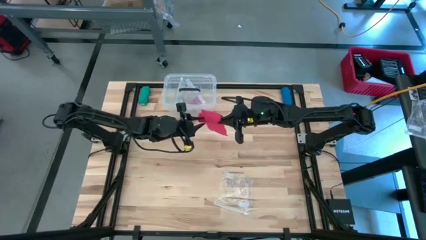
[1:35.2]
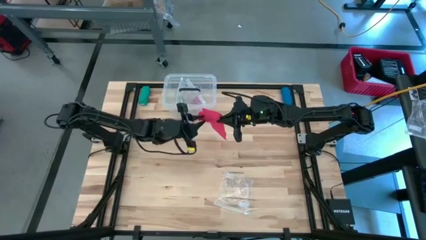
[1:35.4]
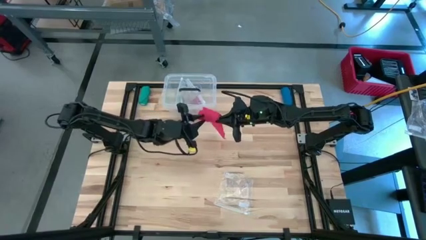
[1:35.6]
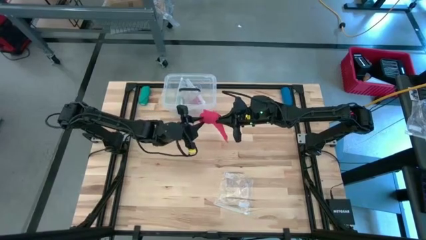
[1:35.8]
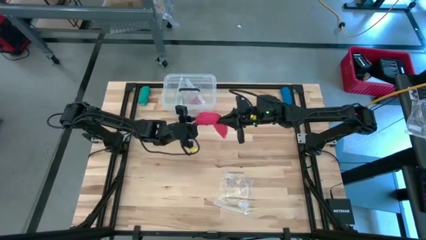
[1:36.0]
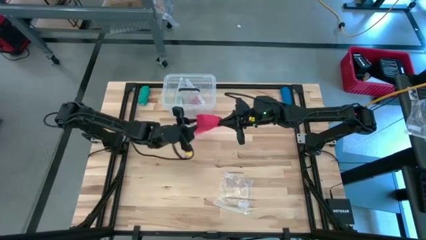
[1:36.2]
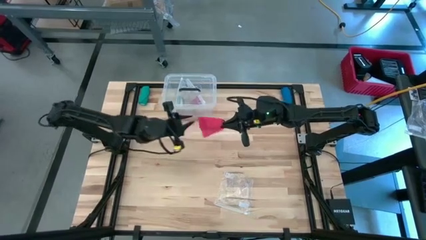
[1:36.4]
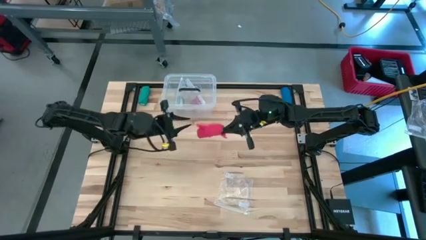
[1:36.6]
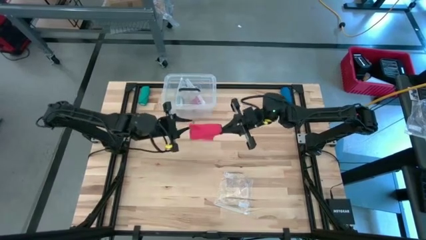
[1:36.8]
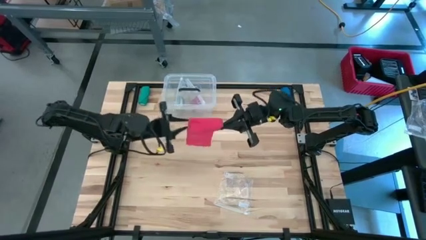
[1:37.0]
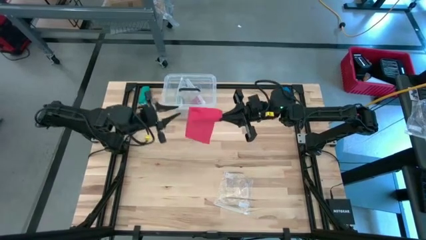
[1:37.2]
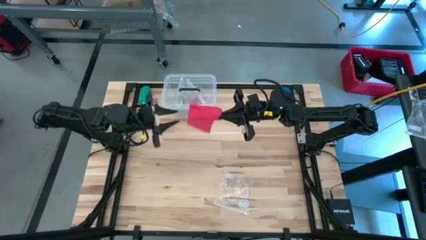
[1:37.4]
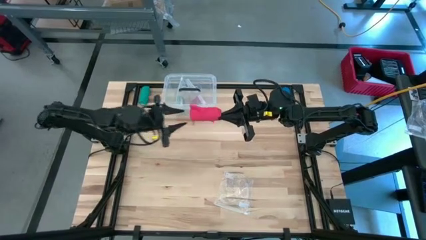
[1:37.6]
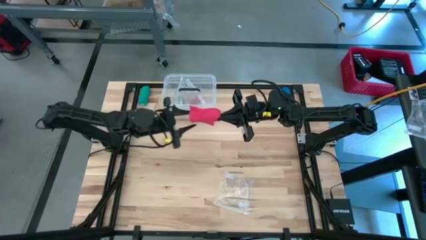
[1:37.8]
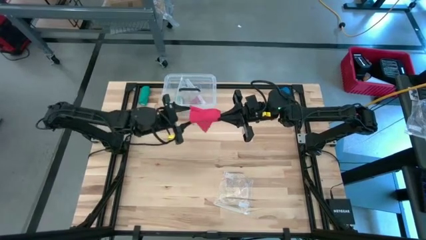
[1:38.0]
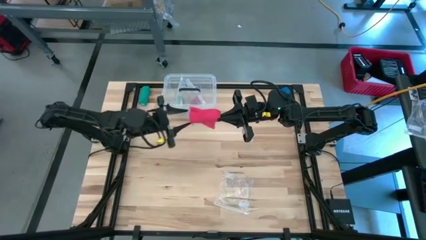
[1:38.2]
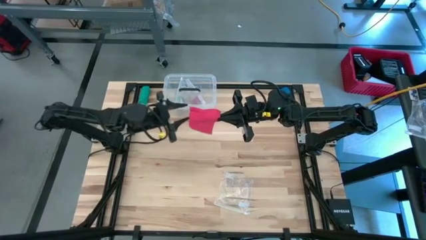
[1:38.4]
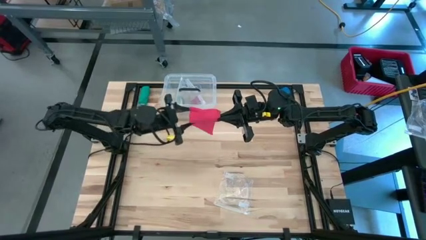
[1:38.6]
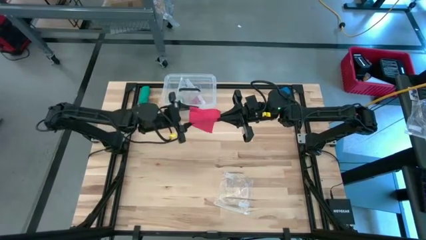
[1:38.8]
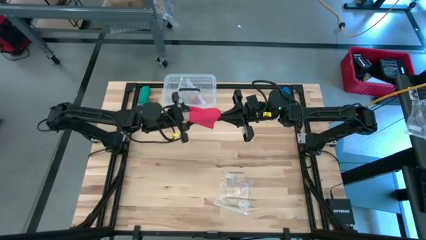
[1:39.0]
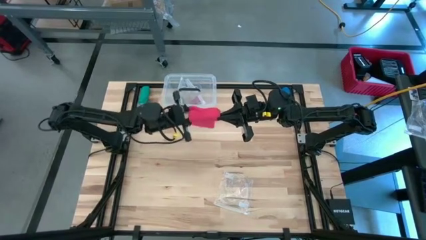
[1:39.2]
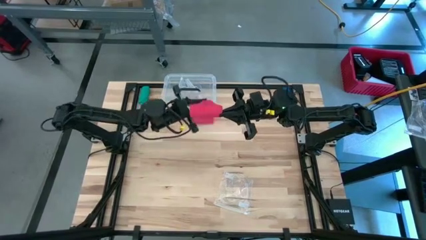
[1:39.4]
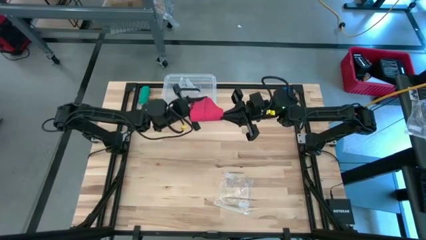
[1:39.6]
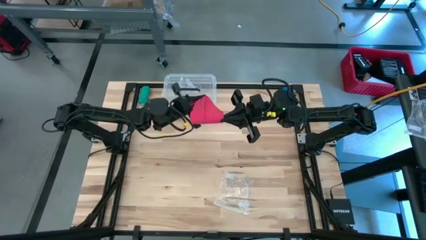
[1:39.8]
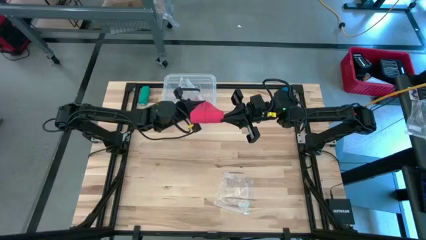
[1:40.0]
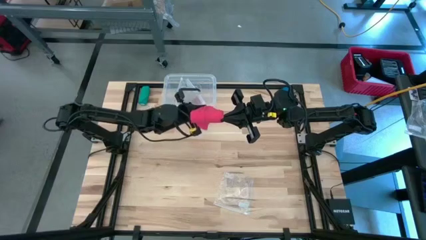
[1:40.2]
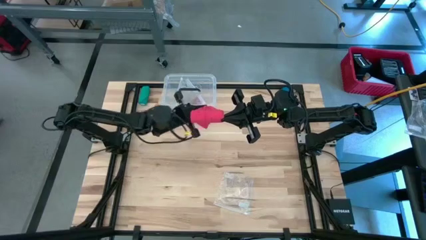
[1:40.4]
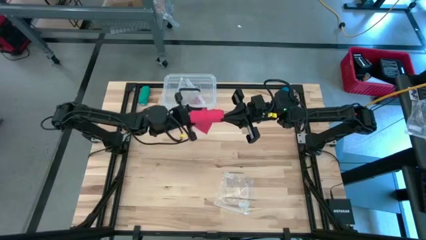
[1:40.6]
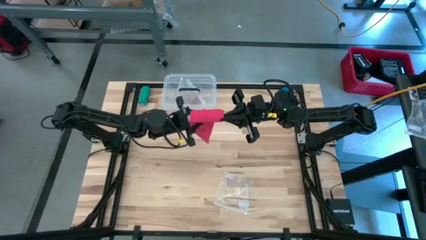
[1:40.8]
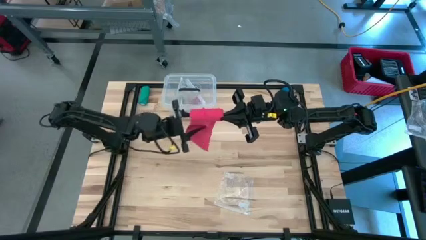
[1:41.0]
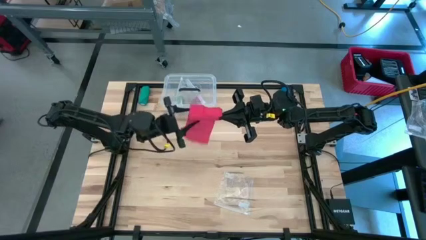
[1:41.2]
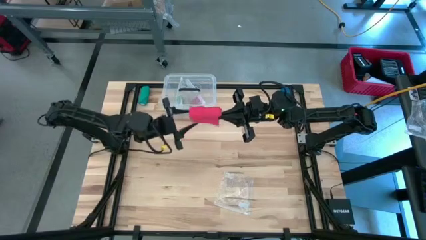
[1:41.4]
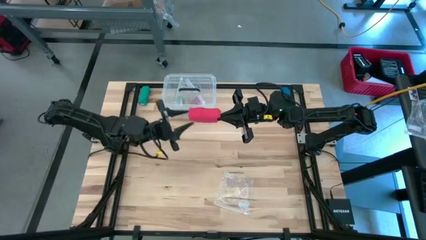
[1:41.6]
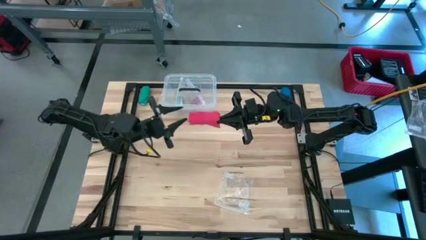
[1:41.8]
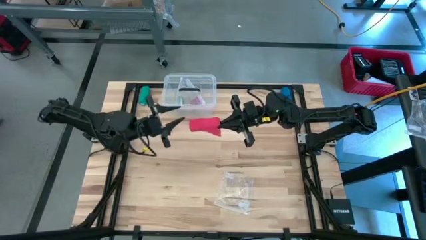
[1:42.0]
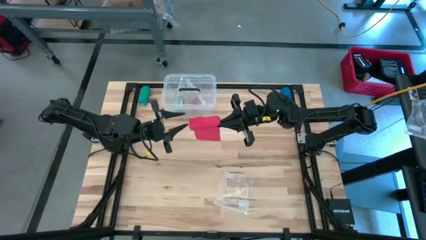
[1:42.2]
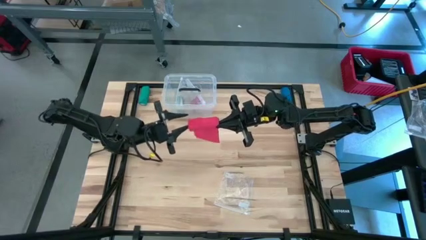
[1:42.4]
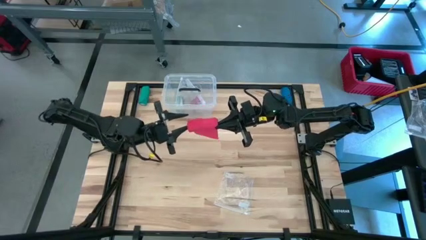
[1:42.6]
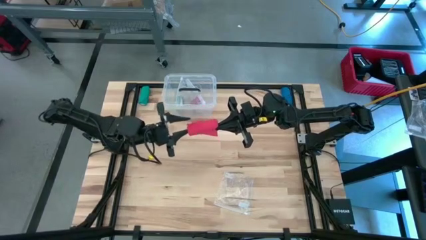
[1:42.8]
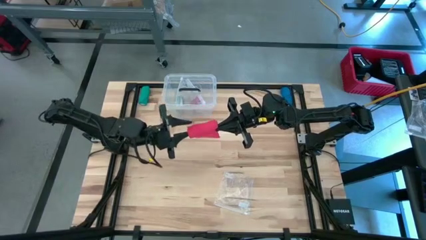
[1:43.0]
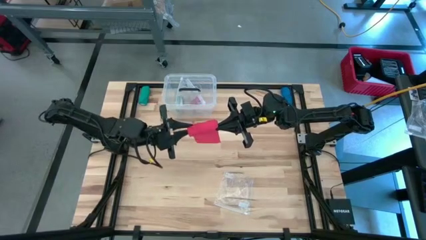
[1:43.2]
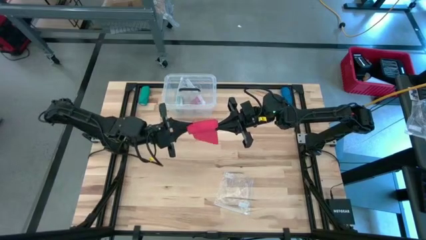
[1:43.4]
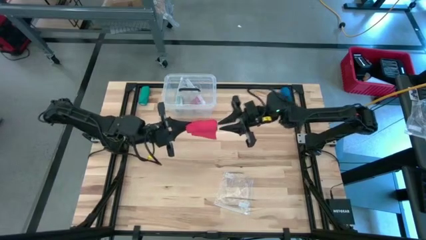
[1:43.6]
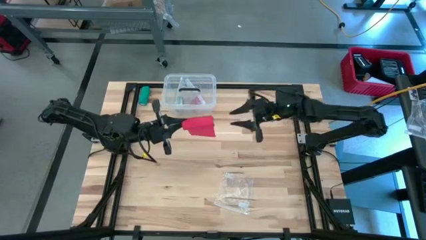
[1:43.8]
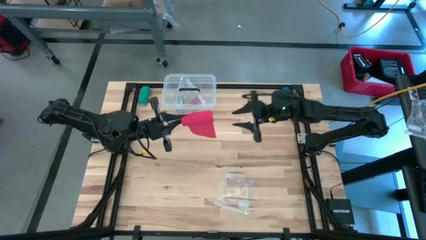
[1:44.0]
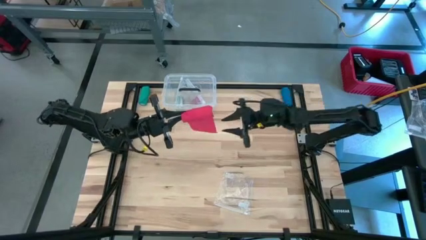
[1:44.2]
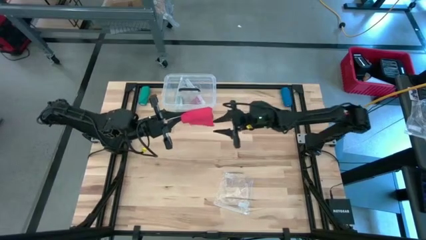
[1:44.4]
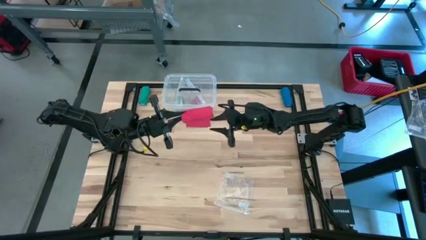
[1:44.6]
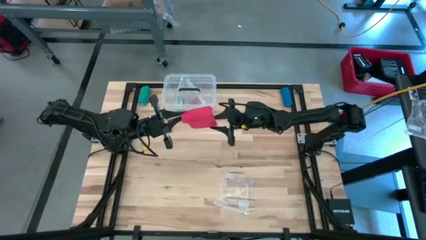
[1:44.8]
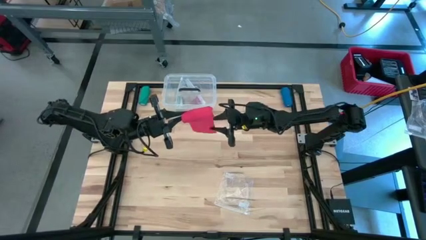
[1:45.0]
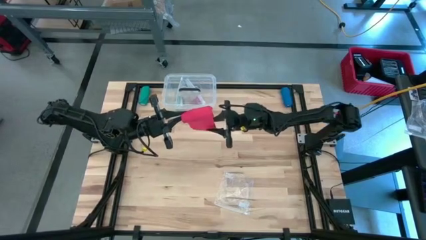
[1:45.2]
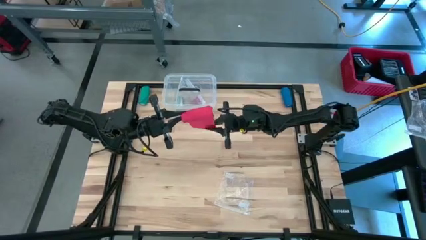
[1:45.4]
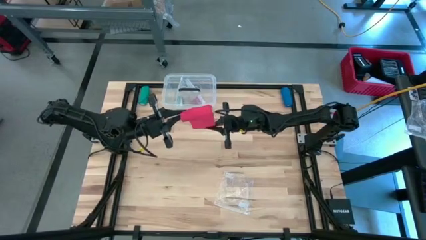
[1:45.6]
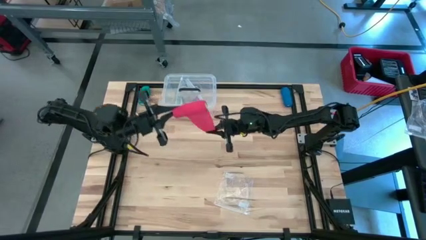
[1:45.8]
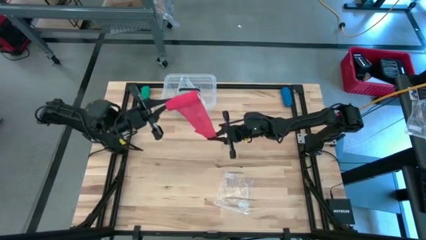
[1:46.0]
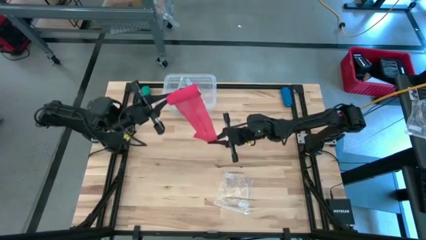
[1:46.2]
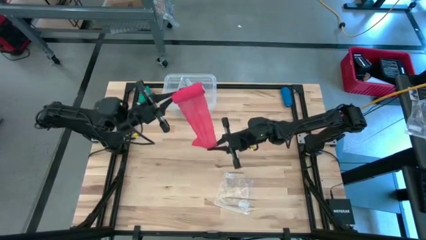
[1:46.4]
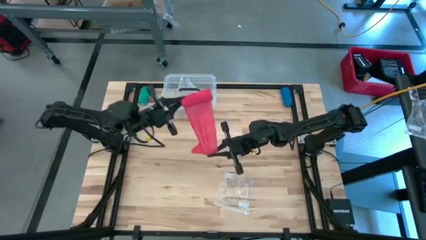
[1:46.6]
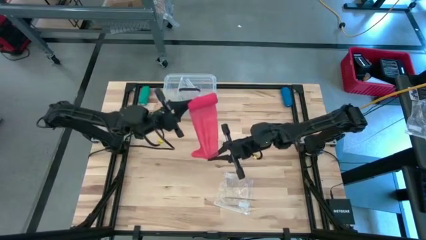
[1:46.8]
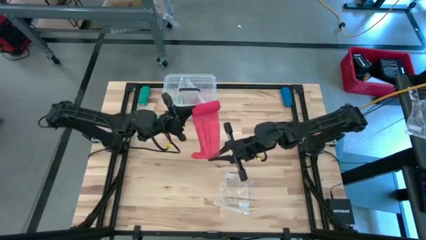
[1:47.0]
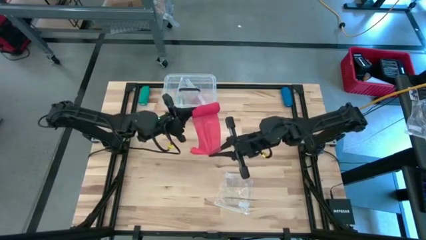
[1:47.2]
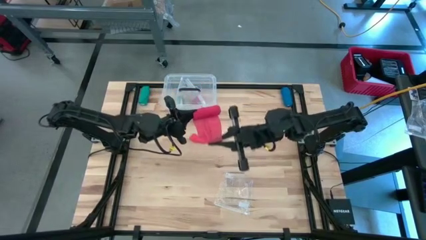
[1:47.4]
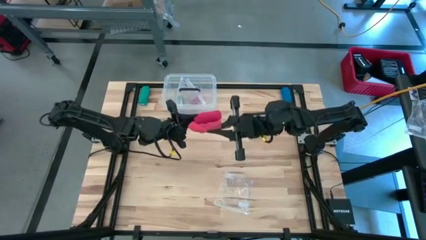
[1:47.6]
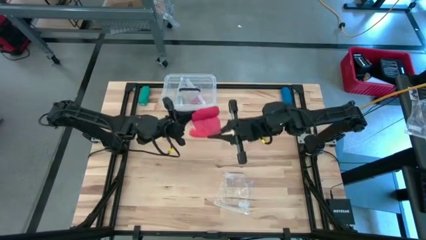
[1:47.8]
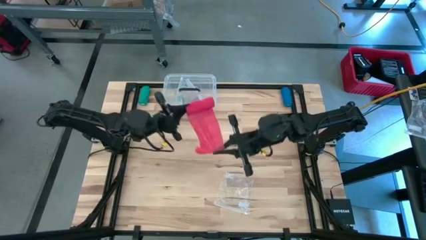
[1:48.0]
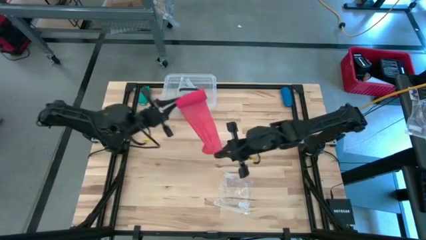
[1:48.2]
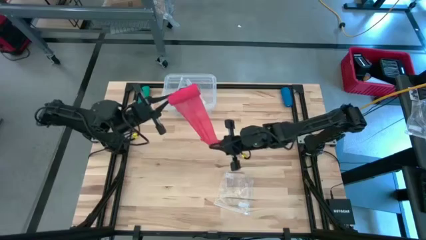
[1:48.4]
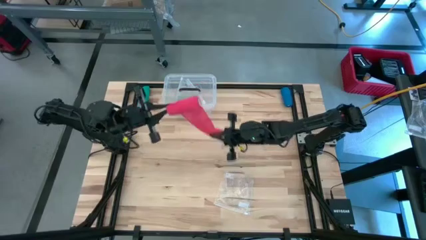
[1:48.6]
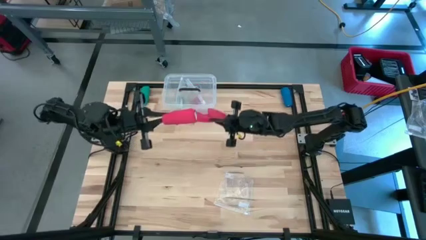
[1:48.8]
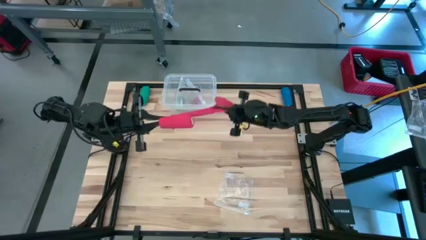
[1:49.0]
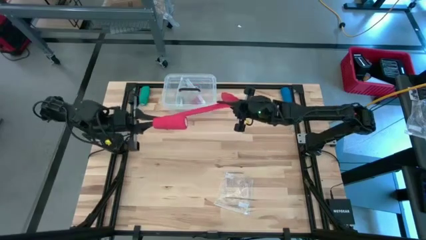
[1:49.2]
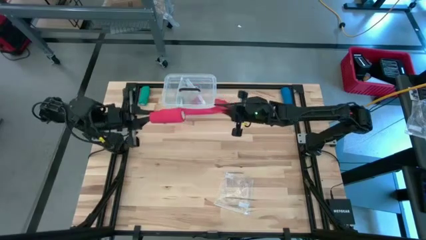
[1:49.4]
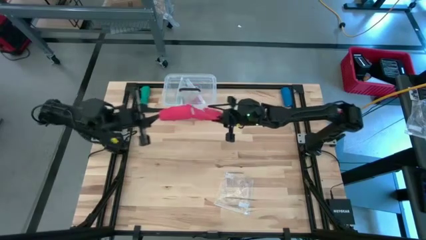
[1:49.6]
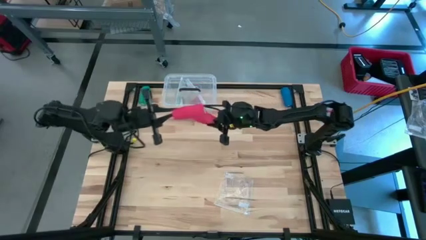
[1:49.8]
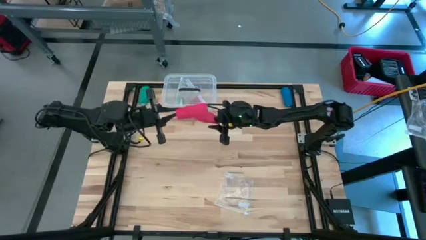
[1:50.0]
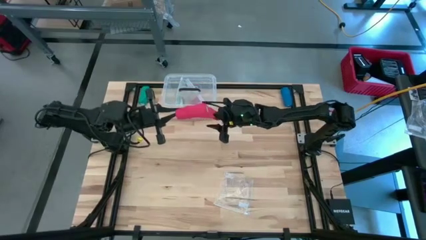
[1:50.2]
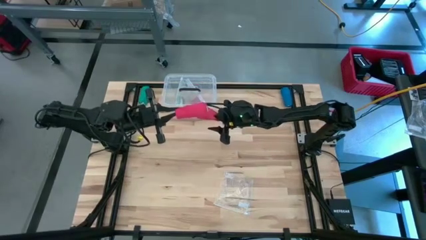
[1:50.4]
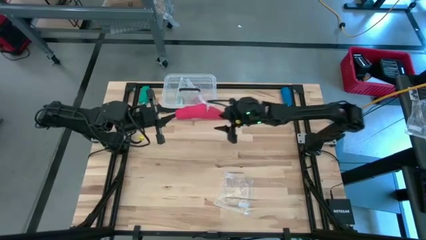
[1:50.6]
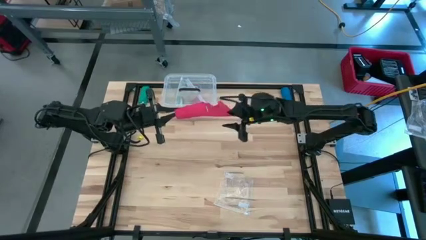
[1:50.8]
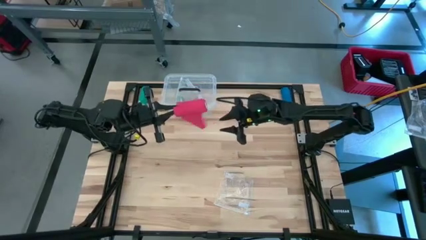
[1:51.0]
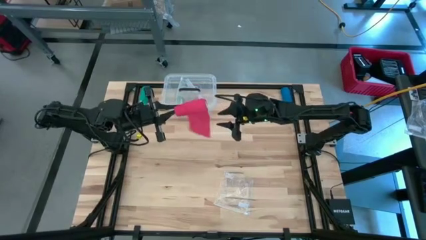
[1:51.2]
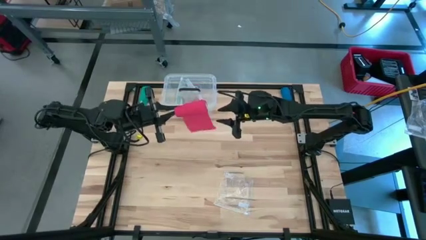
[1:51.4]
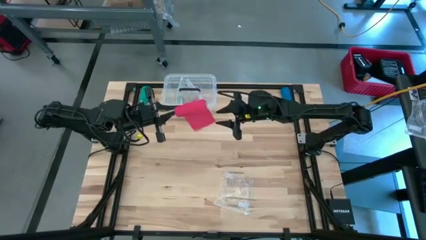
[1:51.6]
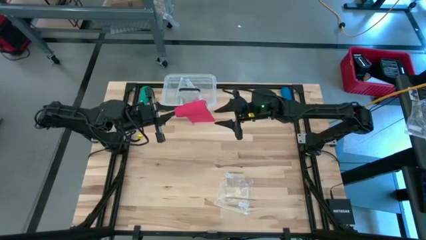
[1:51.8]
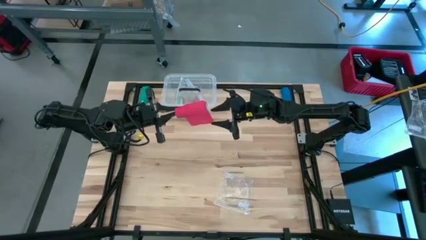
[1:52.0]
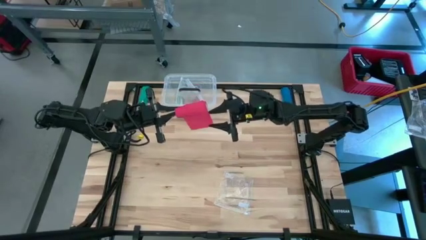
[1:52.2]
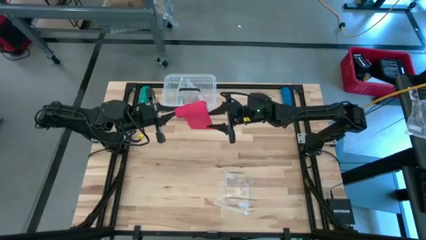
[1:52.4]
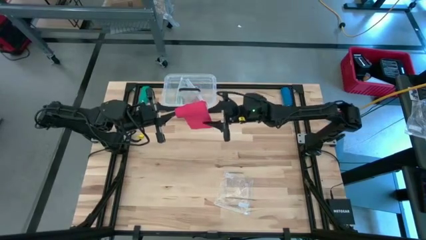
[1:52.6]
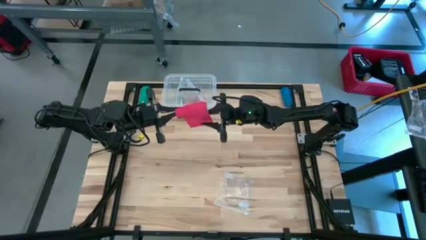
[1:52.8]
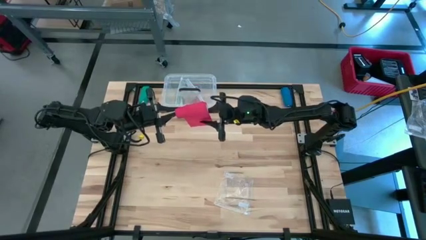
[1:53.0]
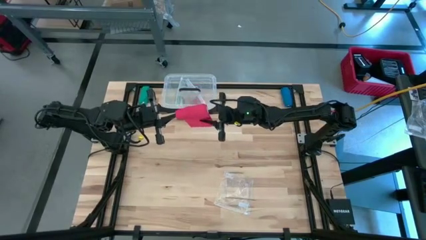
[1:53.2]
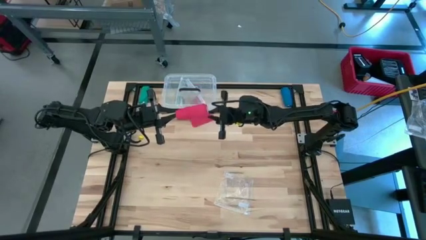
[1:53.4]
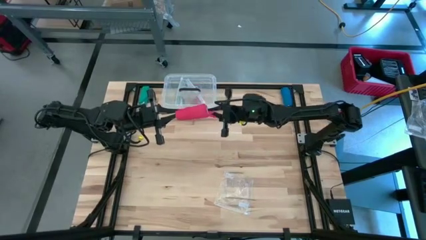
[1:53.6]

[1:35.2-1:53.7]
Task: Roll bandage
Roll the red bandage
